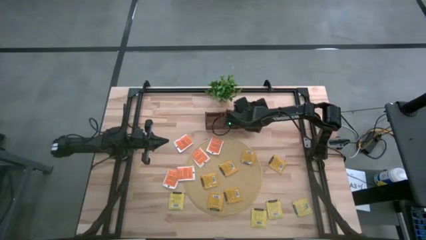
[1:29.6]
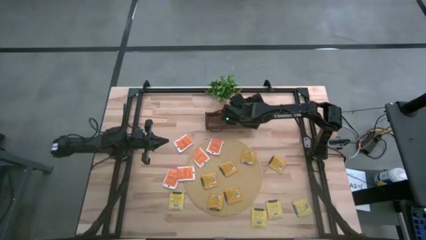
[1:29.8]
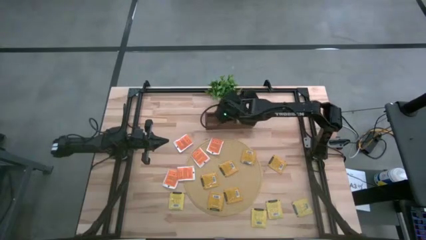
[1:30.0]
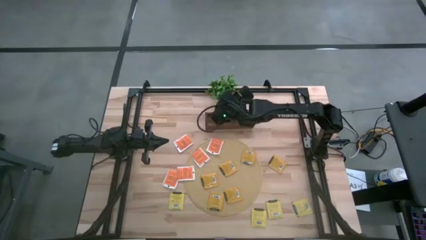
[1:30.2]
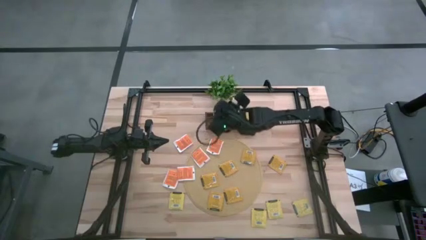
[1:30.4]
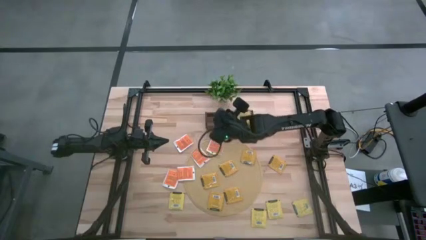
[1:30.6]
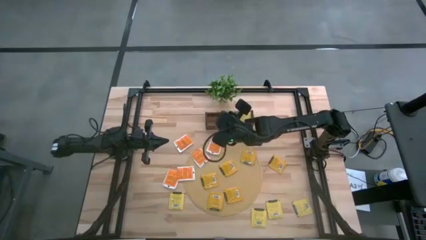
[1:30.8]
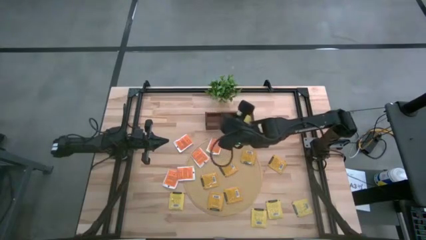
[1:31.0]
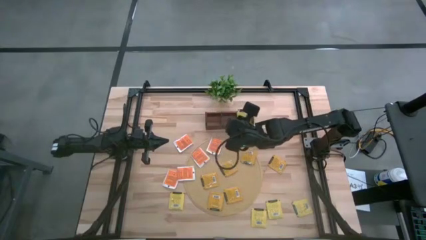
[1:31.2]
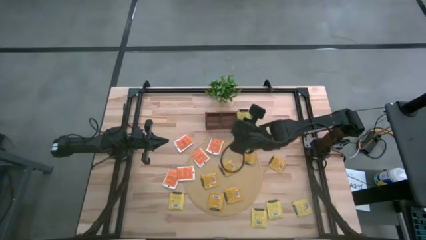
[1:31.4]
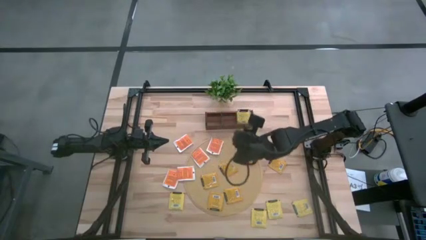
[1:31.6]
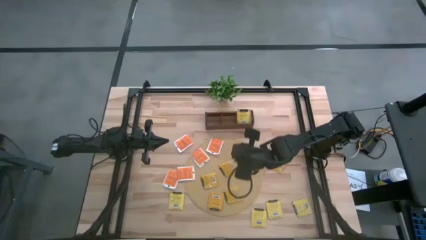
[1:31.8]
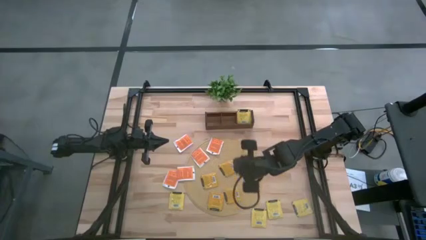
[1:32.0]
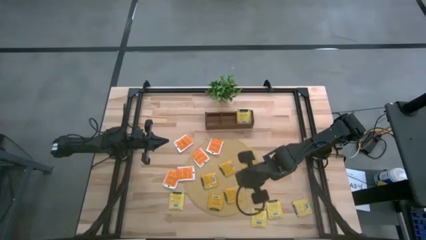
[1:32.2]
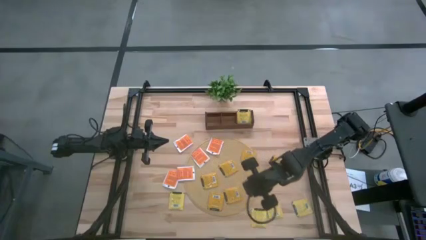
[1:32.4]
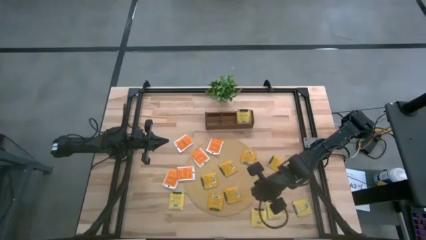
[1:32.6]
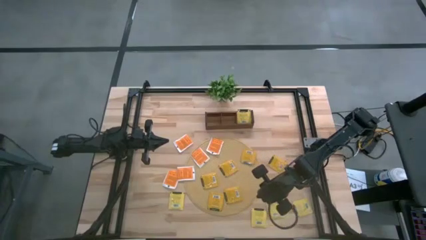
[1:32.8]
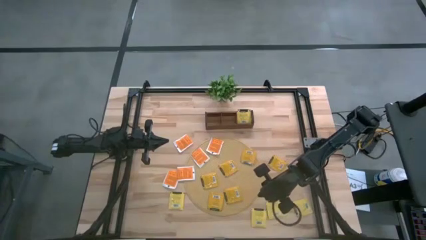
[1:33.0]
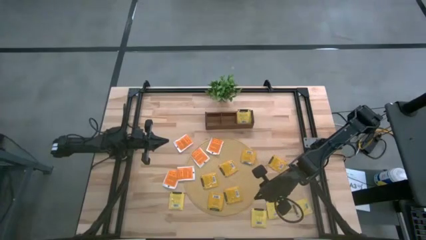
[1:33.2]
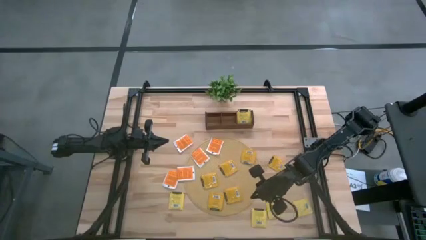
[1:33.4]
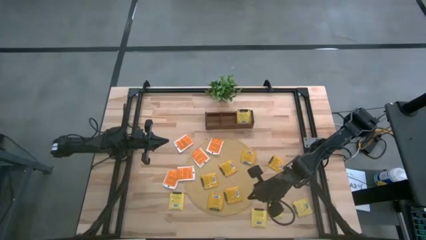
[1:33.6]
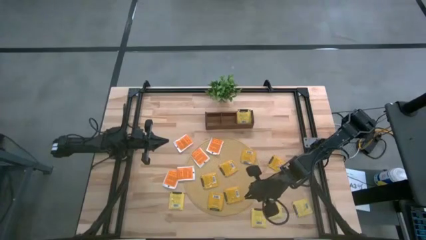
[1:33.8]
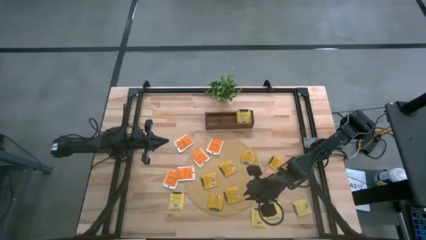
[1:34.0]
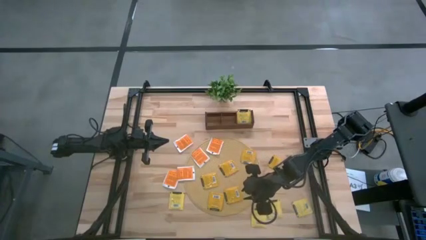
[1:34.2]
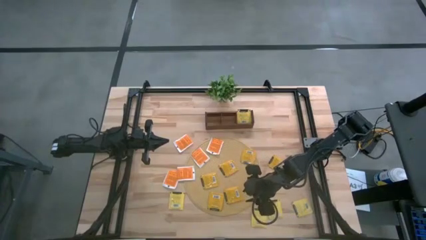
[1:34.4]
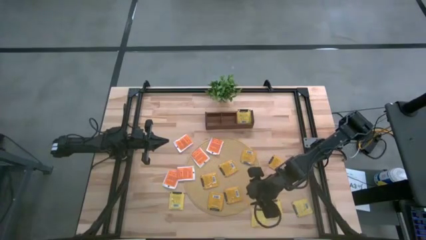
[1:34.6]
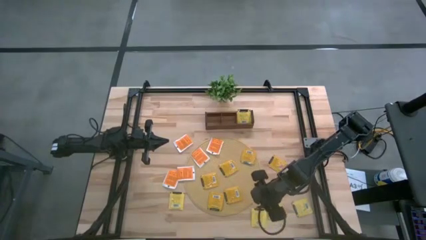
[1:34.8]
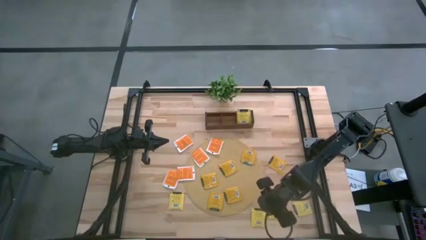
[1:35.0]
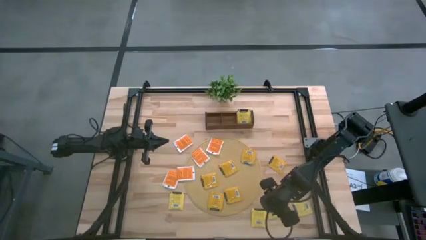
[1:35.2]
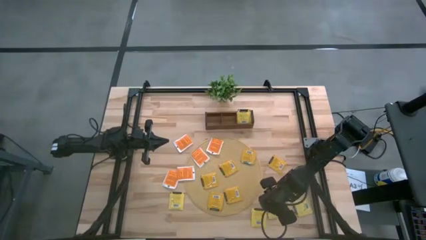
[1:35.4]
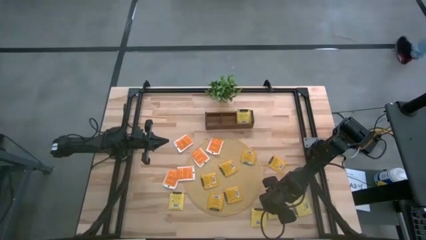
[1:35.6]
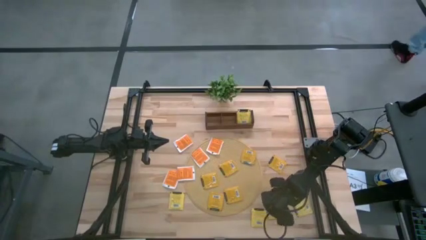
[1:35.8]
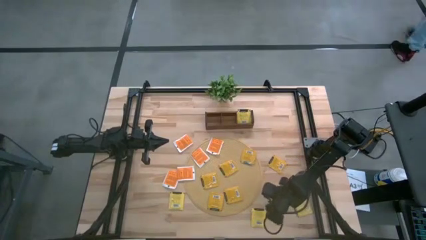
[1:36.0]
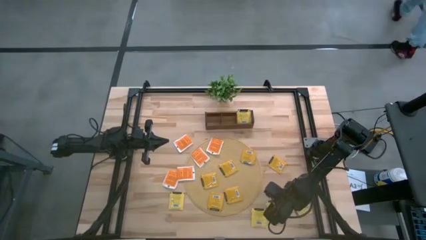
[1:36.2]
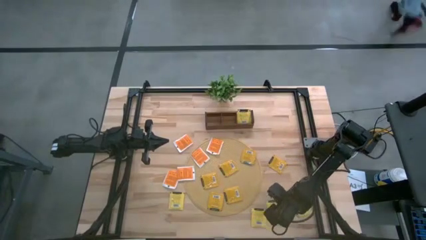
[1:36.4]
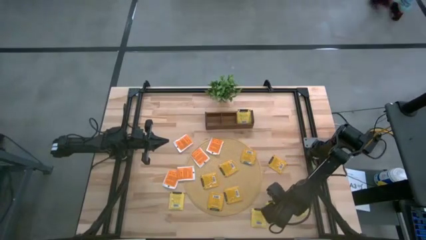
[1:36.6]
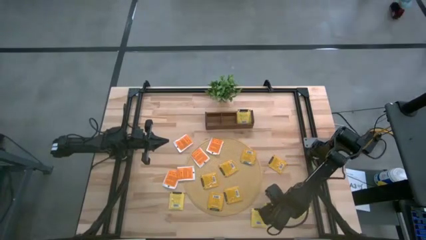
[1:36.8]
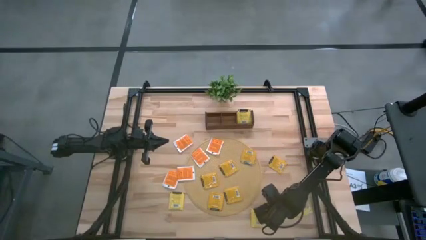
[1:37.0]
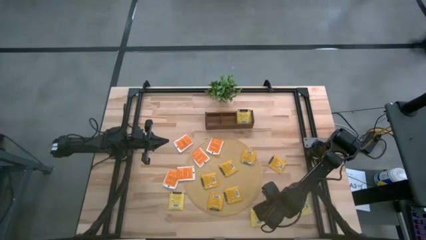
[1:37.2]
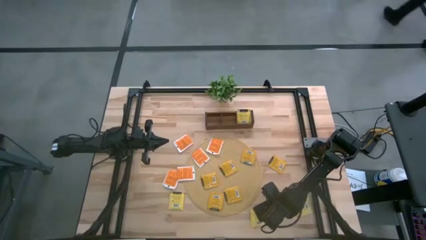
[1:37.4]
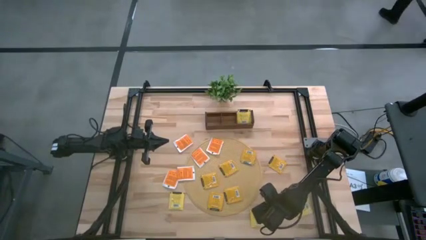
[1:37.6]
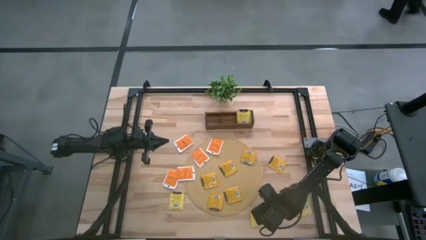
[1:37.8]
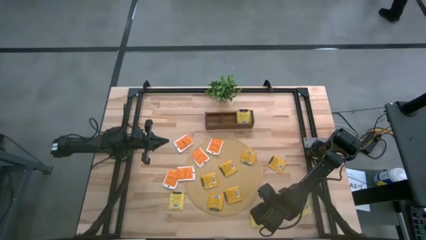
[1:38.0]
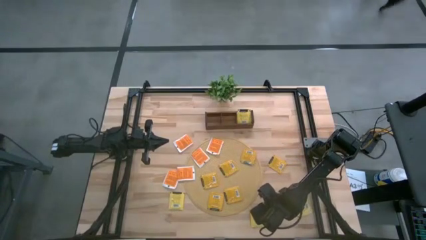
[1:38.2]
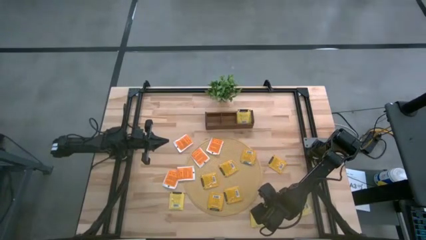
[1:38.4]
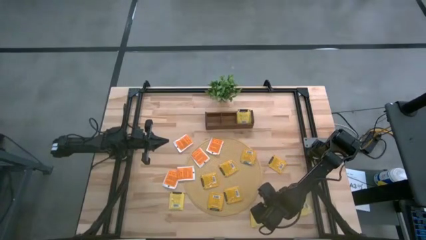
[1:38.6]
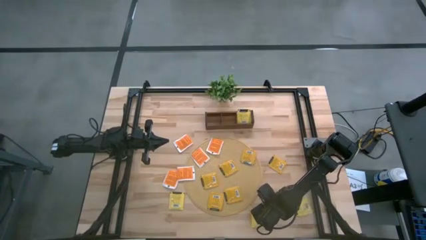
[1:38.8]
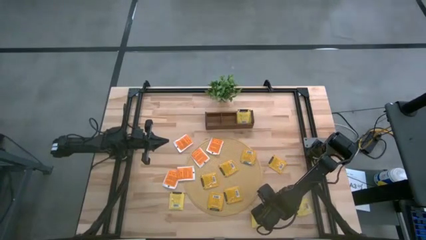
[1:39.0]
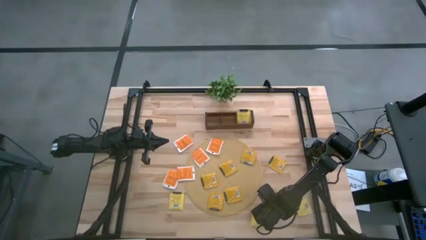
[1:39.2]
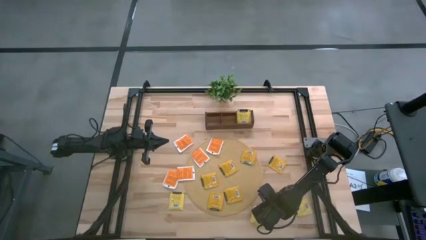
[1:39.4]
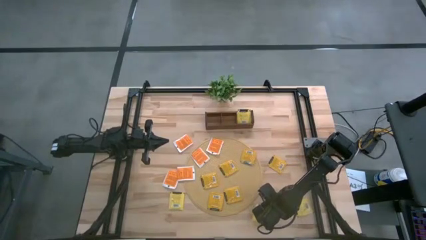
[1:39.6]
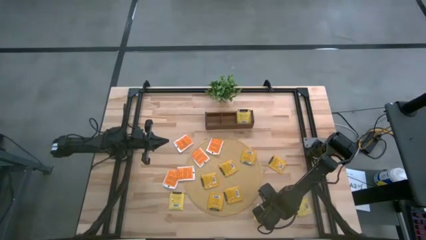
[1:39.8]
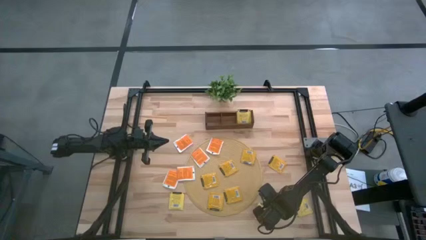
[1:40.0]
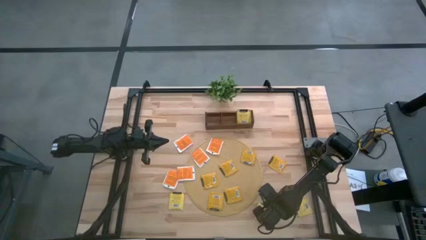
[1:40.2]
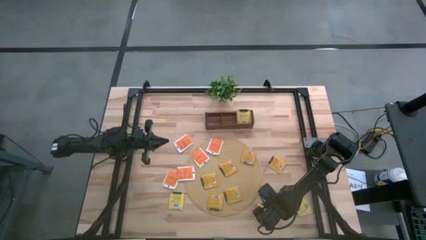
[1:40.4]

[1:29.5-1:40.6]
Task: Pick & Place Tea
Put the yellow tea bag into the right section of the wooden organizer

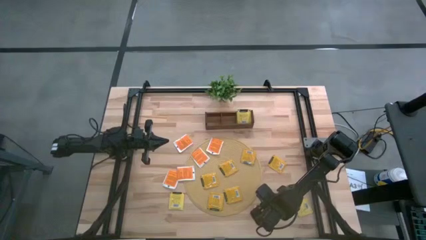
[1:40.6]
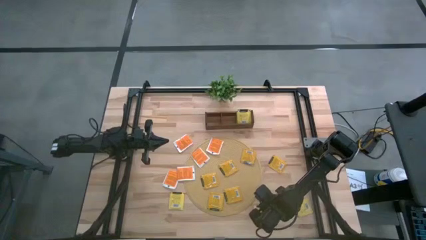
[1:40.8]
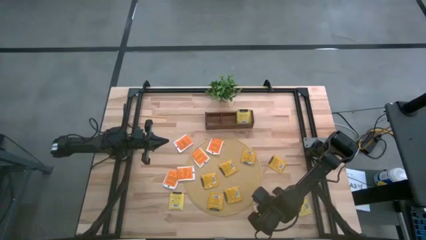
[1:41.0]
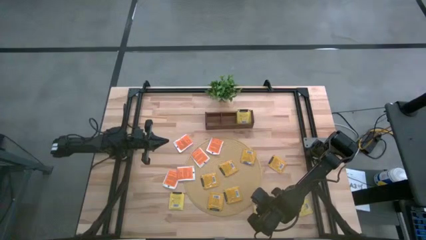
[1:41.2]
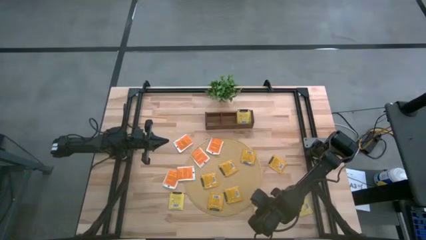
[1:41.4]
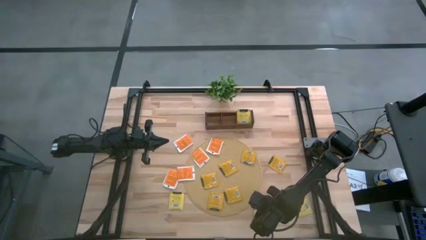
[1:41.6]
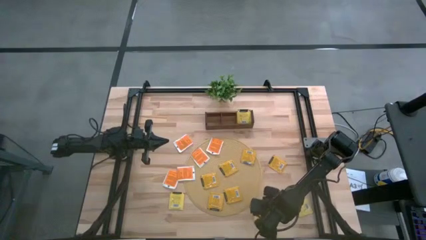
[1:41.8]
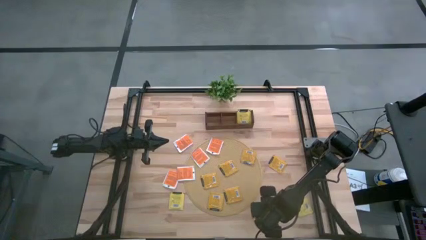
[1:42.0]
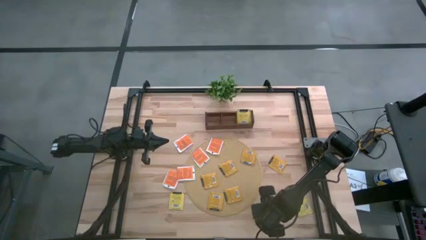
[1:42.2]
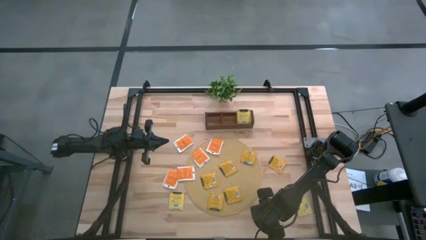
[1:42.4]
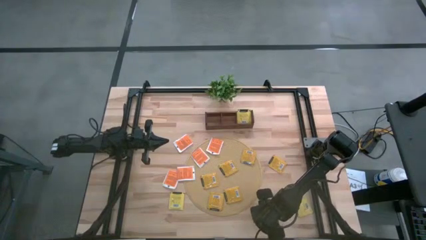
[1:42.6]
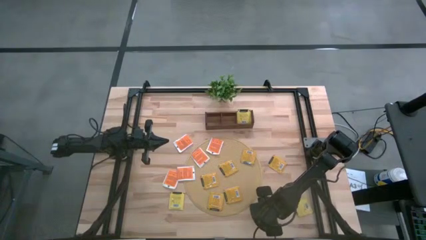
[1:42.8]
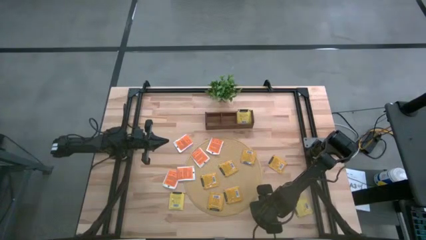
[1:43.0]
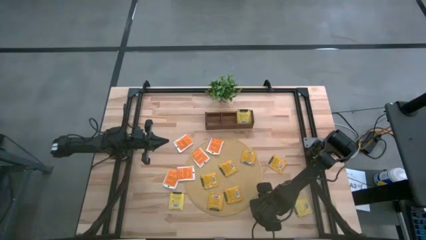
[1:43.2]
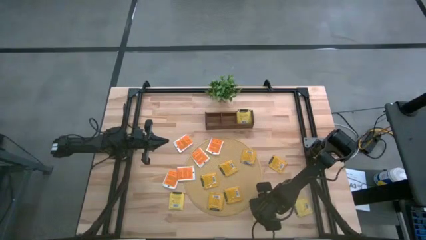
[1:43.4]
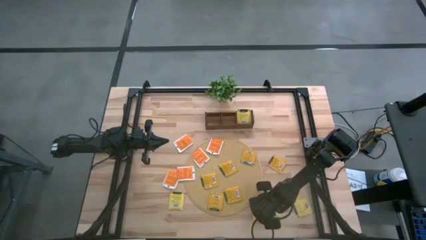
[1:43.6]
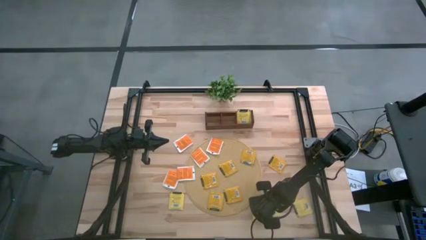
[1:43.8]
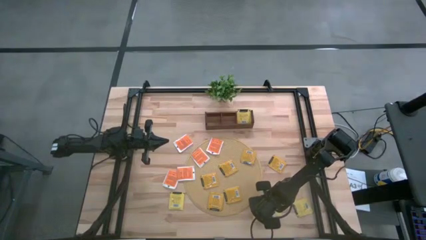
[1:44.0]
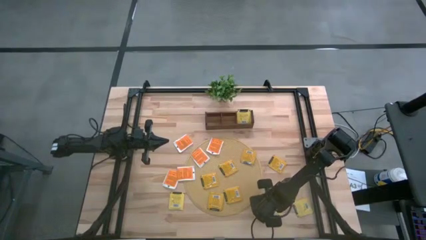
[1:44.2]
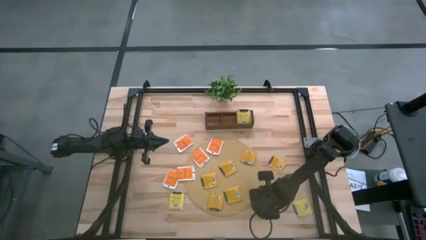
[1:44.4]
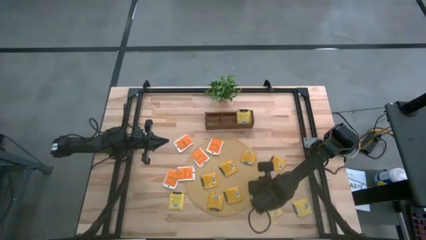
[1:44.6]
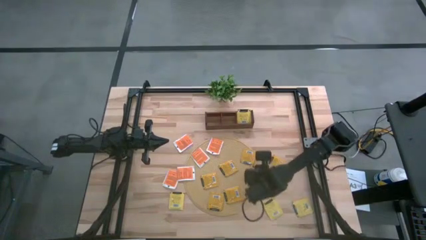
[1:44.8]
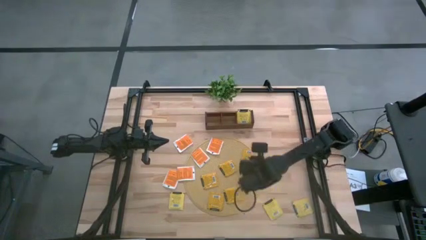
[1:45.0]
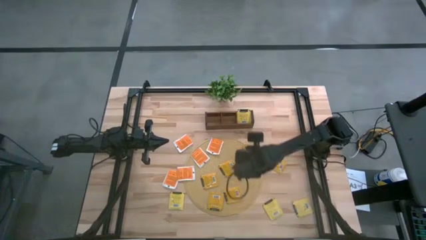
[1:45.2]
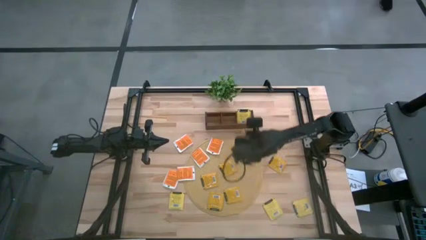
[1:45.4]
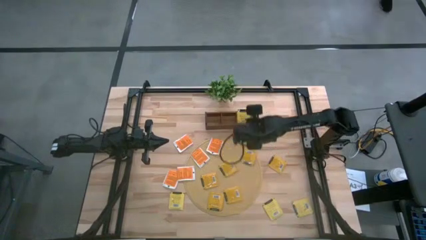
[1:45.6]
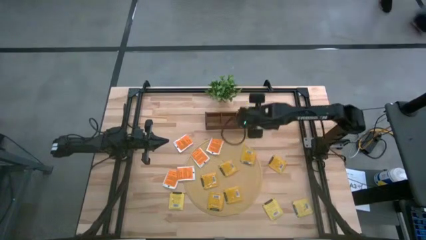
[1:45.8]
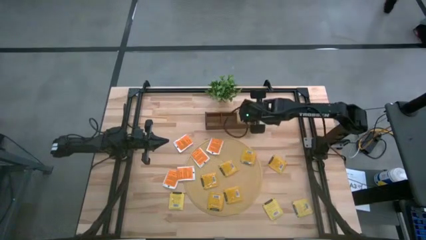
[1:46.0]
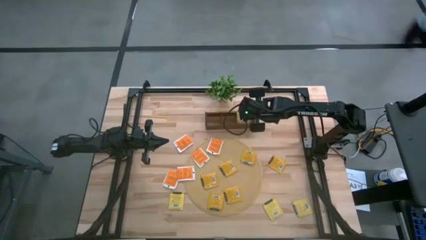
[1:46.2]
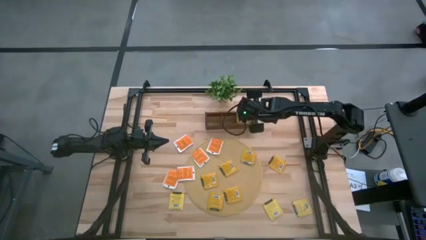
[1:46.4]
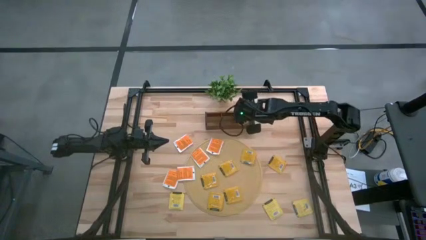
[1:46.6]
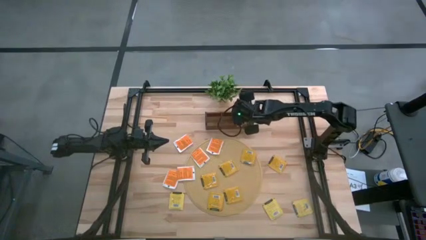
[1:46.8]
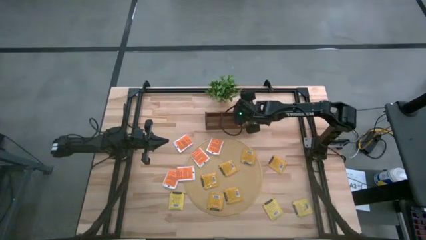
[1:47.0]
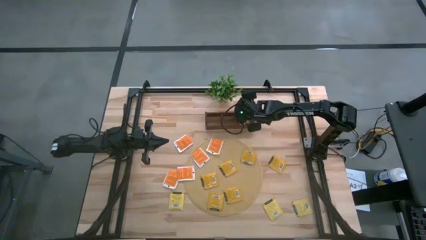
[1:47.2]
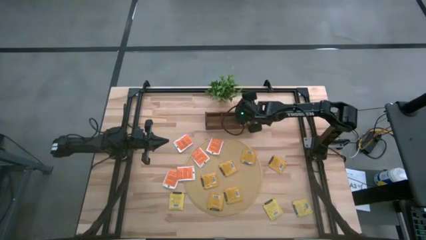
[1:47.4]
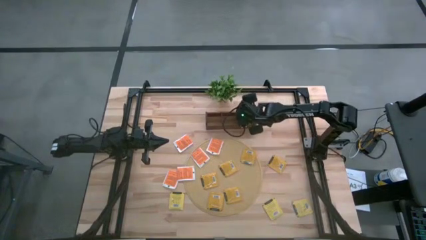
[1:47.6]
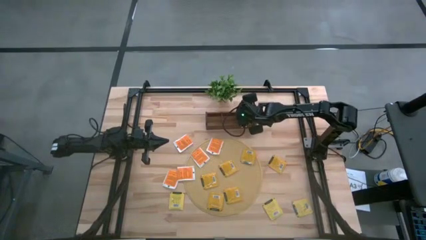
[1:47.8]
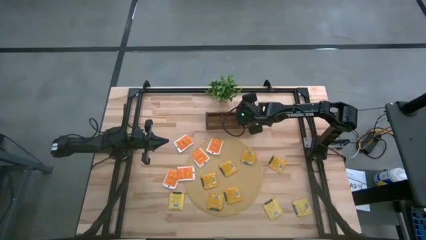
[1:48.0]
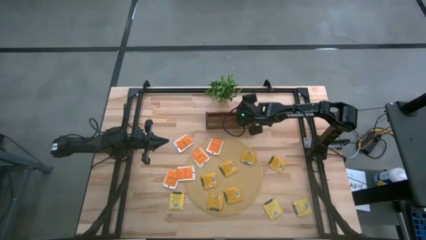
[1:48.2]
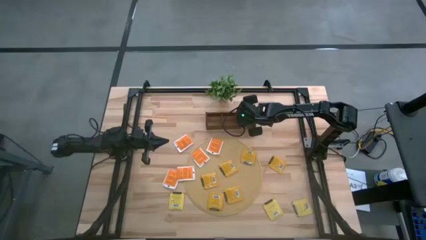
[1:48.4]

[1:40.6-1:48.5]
Put the yellow tea bag into the right section of the wooden organizer
